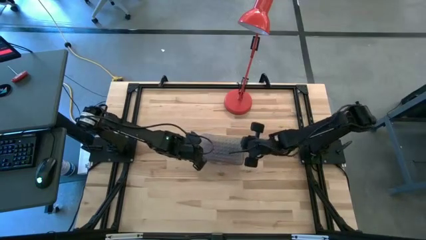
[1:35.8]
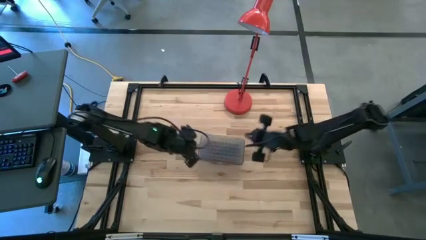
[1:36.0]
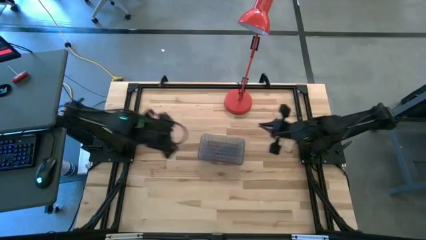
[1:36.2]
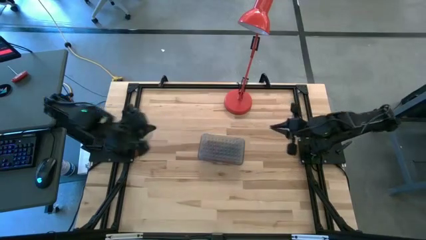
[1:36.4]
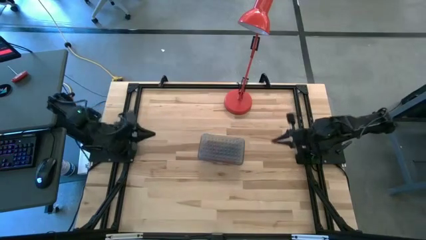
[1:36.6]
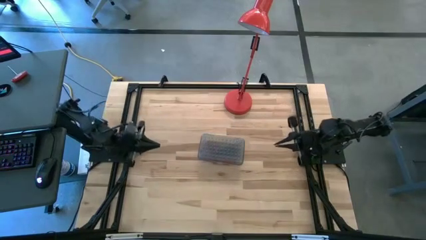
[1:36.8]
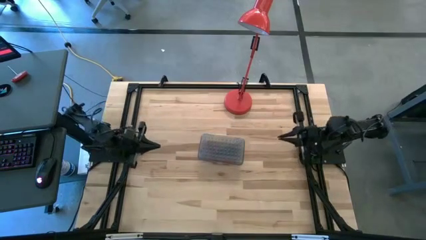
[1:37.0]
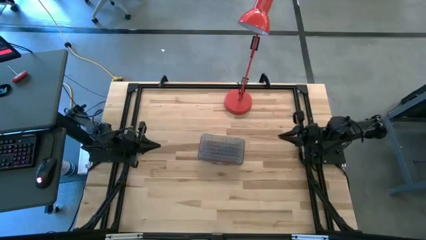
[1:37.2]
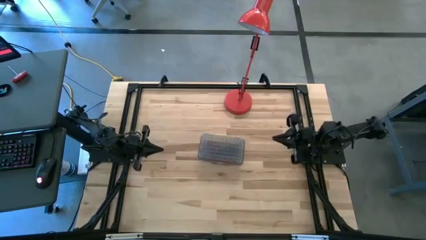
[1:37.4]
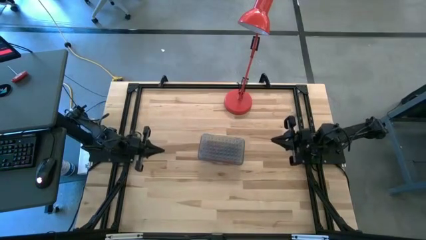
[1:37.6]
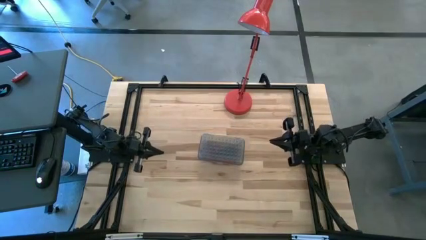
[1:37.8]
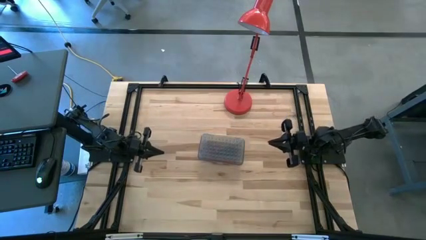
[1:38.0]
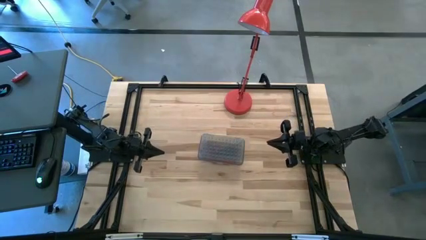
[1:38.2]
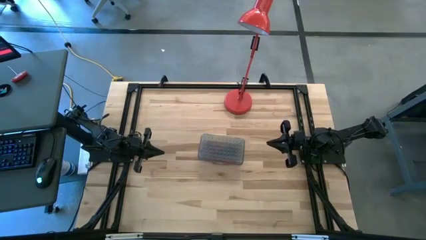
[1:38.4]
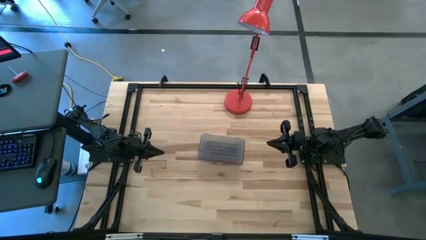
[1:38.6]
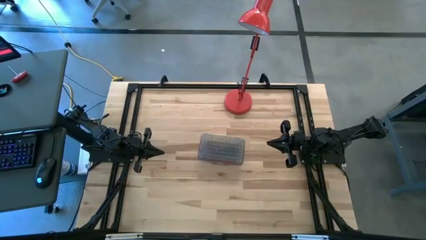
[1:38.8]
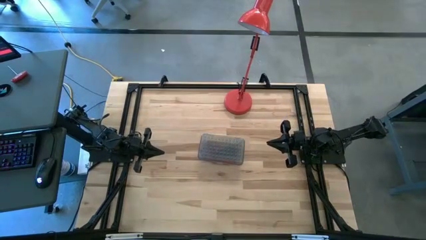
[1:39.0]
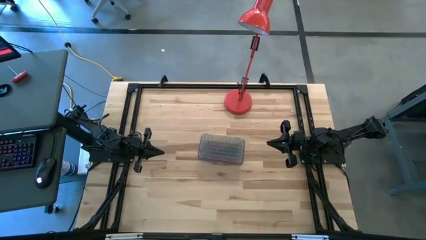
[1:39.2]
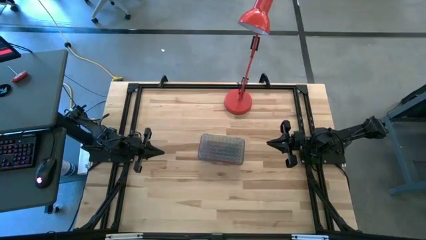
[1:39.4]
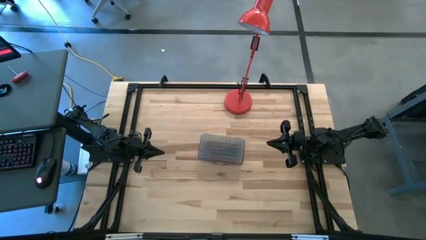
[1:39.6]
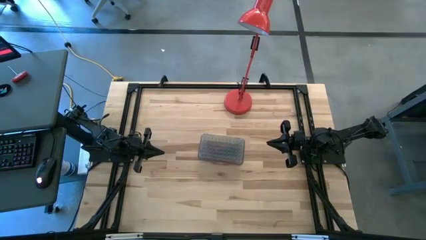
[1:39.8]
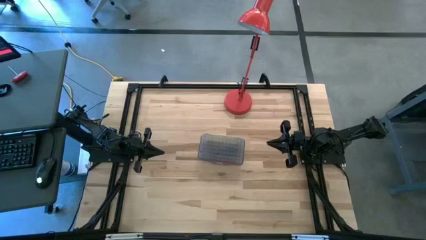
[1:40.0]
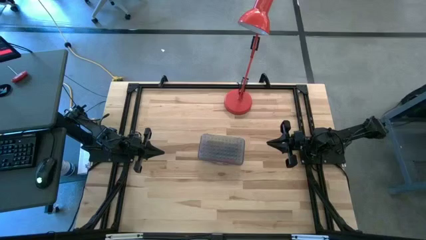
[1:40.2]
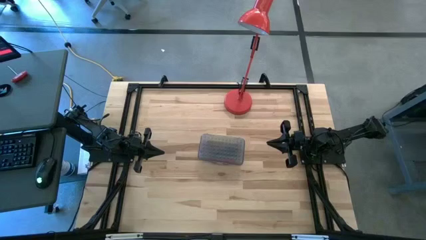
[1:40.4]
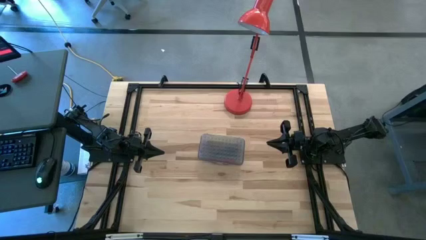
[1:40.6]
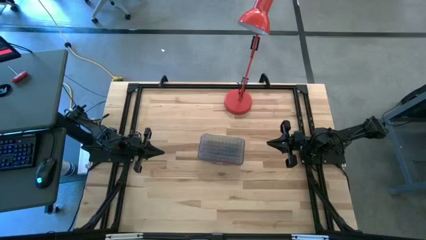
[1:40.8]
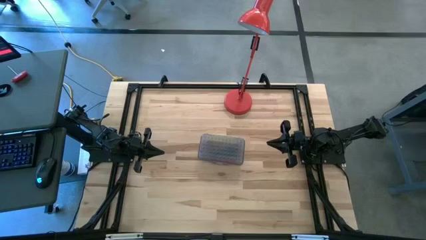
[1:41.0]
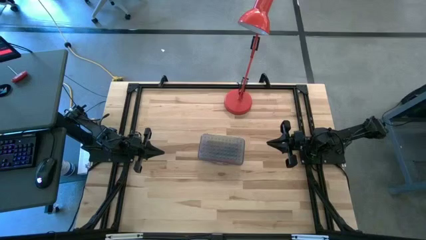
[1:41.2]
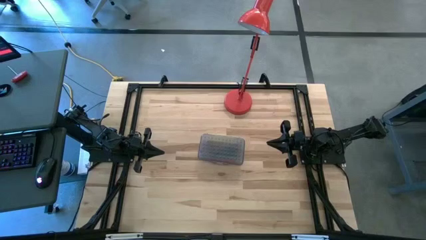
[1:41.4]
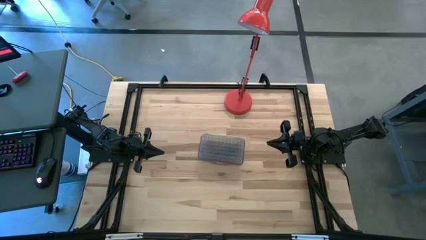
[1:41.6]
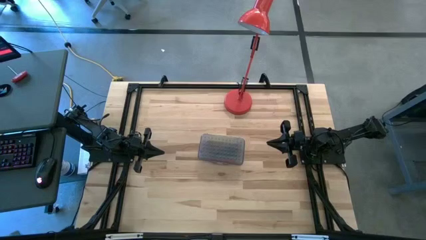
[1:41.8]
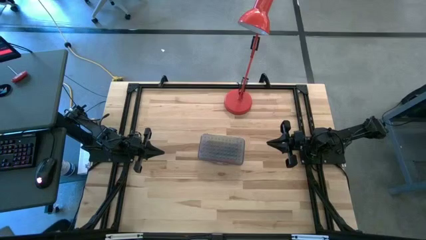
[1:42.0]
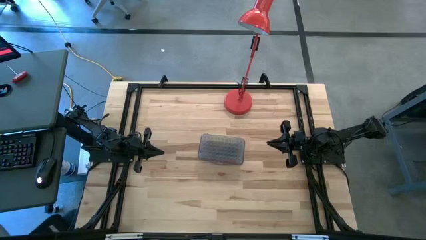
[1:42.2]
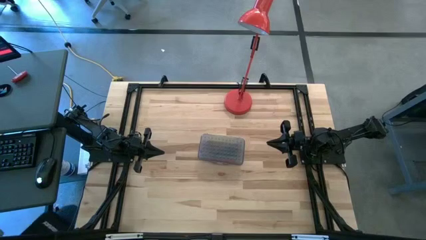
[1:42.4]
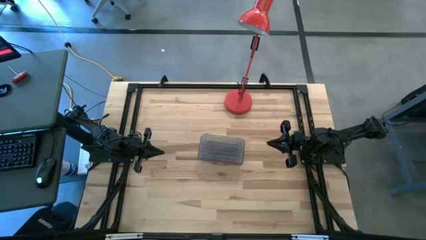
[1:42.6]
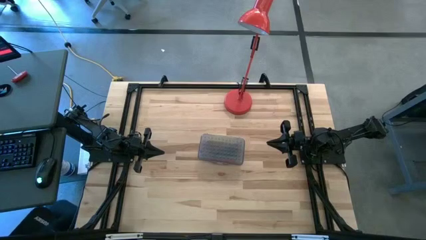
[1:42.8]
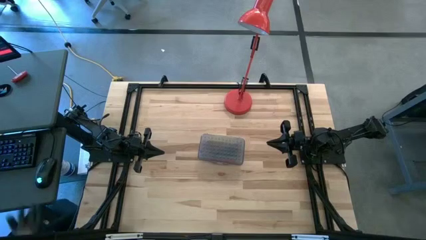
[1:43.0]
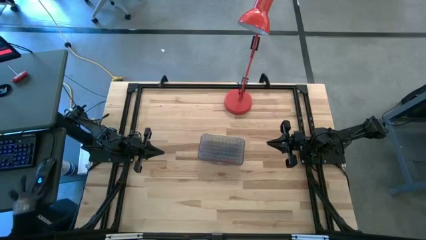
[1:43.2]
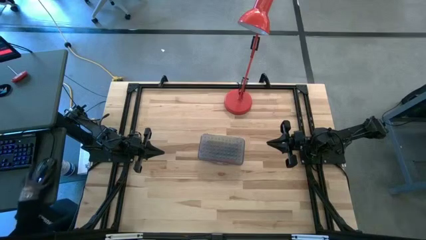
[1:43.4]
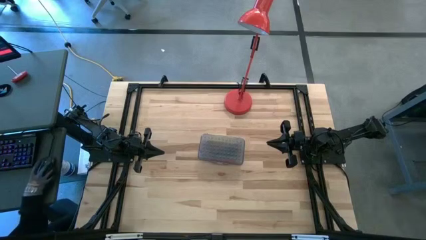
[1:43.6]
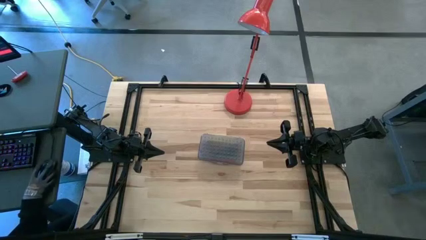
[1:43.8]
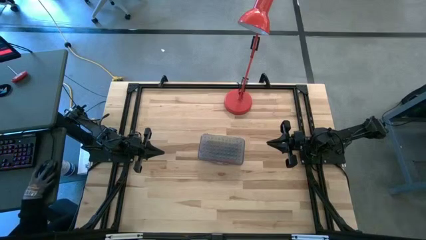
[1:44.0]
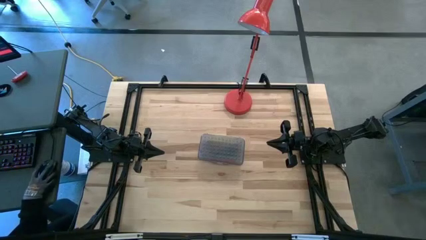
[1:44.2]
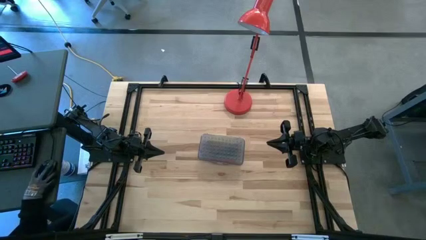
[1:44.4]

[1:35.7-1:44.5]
Task: Pick & place school supplies into a supply box
Return to Home Position

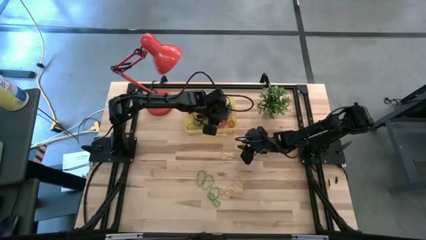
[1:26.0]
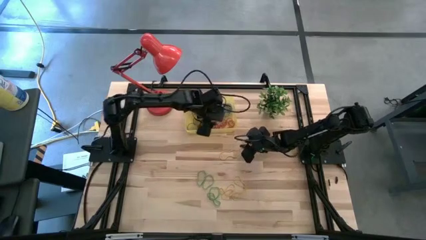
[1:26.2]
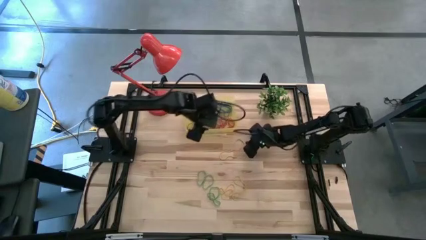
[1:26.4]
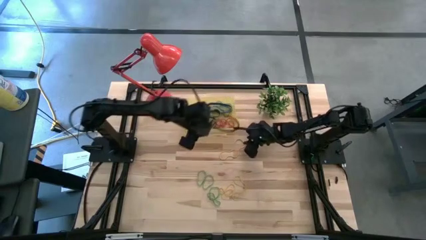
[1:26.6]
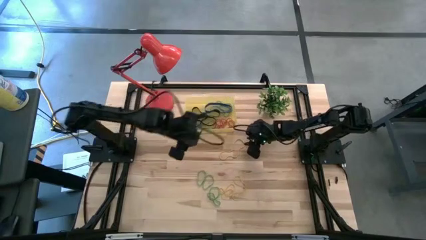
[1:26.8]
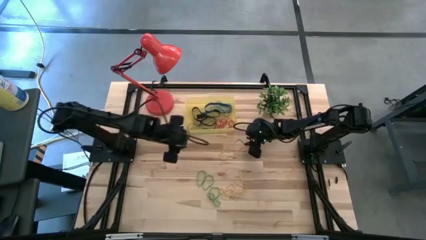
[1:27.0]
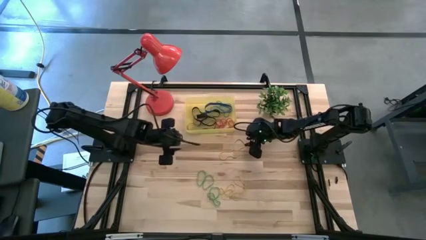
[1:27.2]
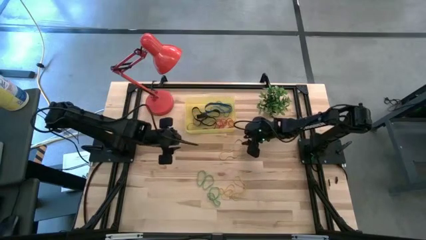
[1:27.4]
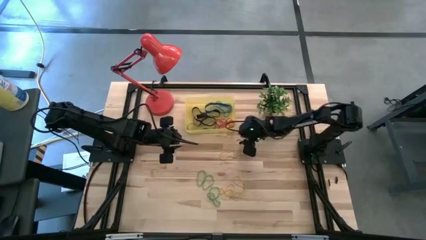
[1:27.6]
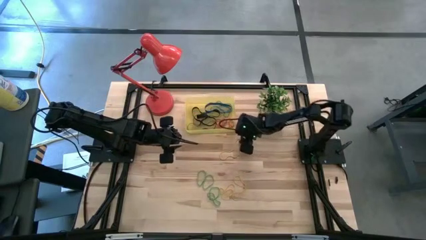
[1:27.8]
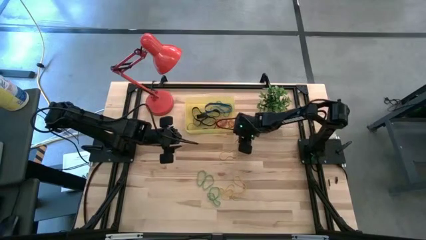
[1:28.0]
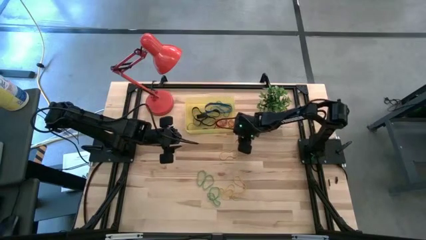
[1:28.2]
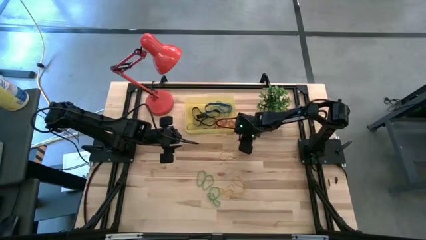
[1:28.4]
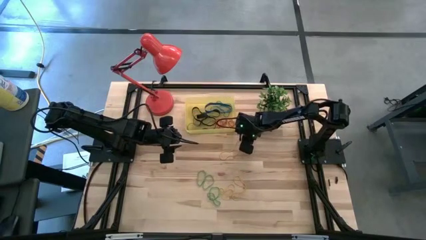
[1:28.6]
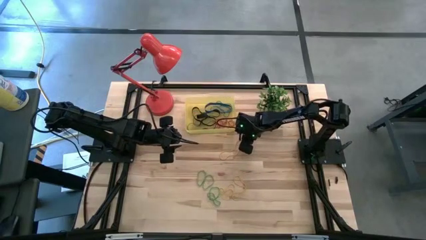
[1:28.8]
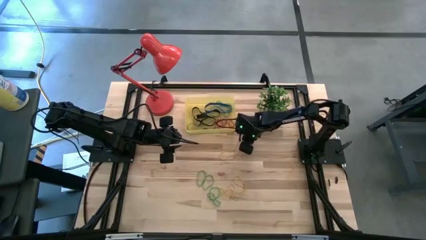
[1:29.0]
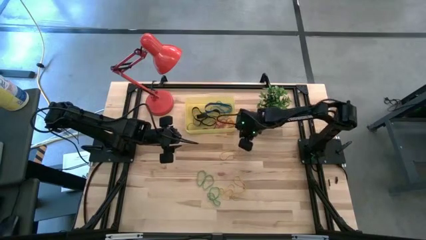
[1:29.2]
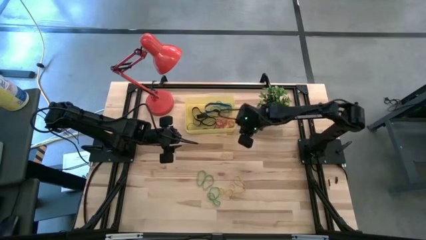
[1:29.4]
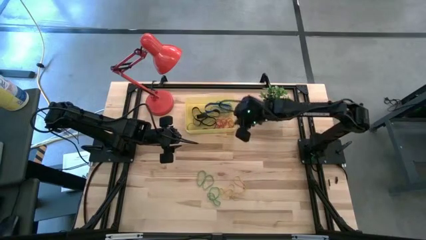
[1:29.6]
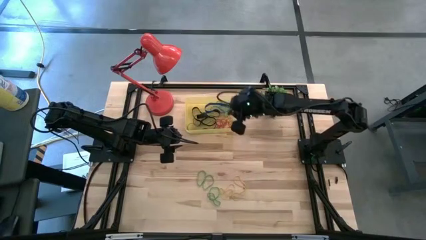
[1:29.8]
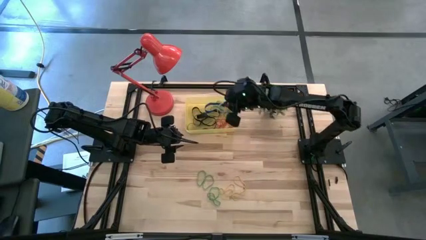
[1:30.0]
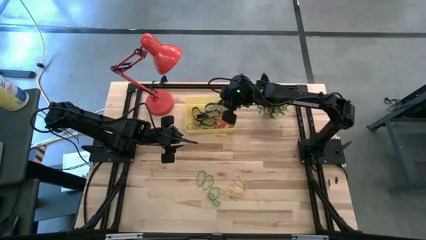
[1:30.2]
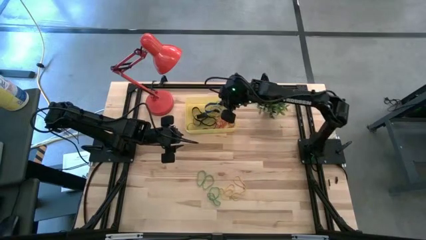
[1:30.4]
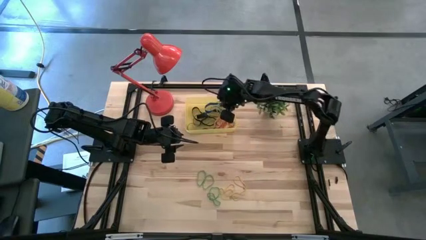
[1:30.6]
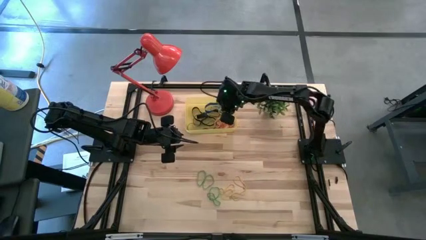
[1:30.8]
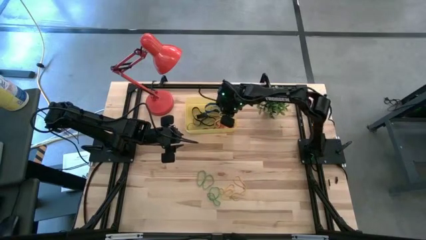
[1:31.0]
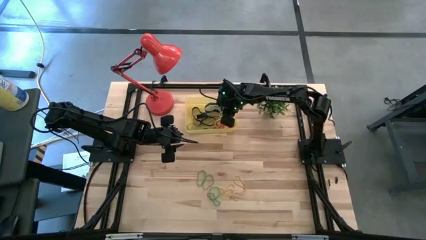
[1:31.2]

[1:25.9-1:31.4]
Task: Pick and place rubber bands into bin
Put the yellow rubber band into the yellow container

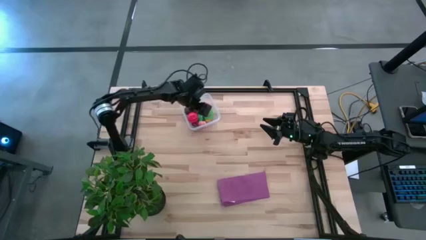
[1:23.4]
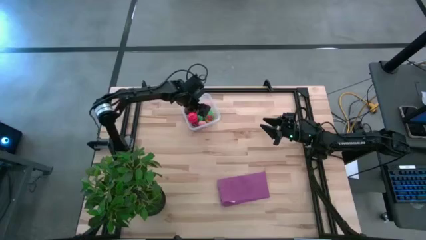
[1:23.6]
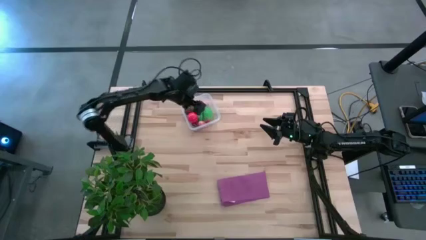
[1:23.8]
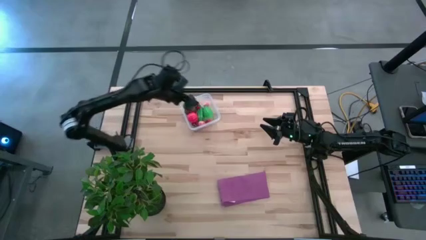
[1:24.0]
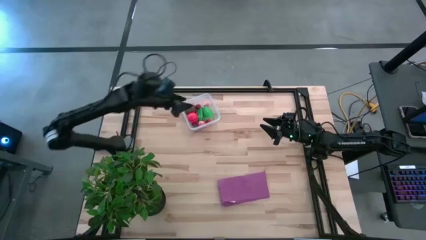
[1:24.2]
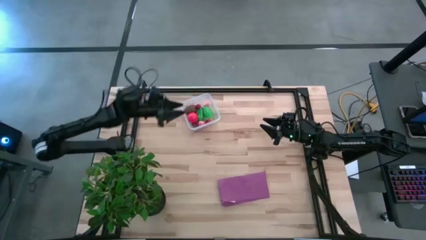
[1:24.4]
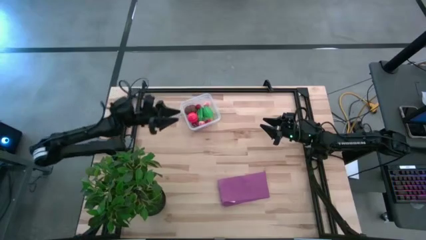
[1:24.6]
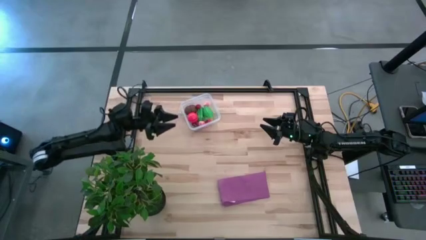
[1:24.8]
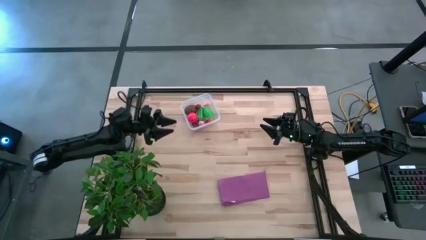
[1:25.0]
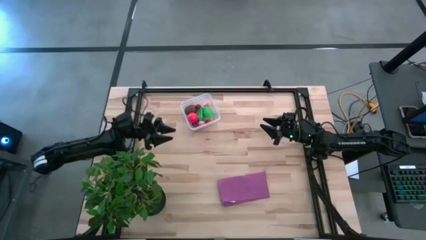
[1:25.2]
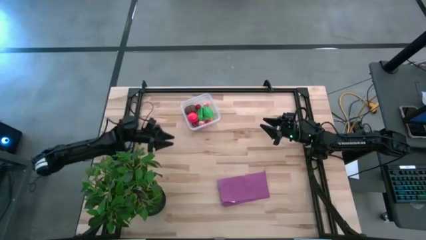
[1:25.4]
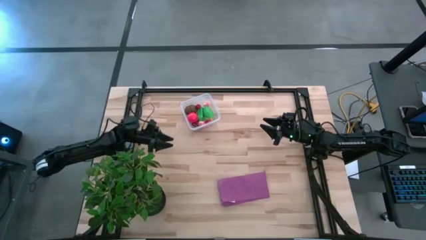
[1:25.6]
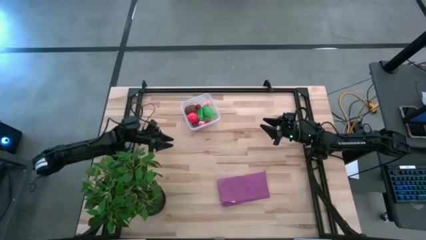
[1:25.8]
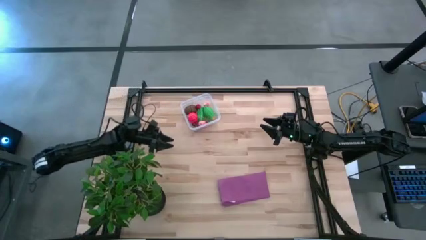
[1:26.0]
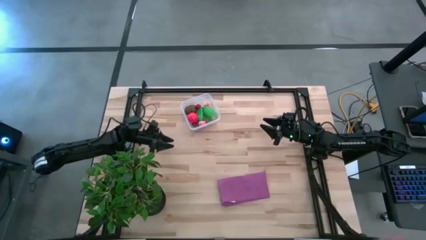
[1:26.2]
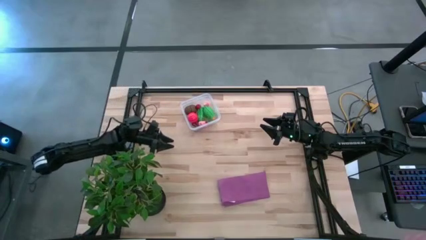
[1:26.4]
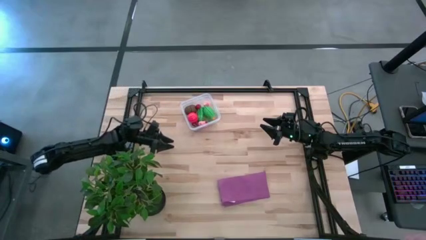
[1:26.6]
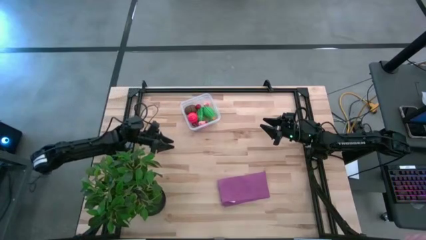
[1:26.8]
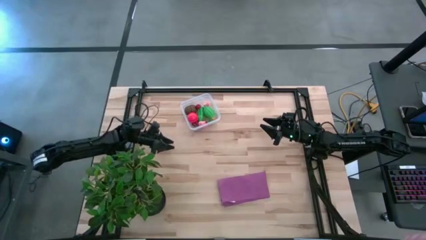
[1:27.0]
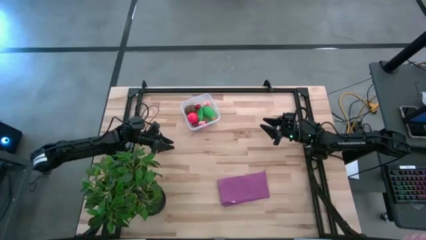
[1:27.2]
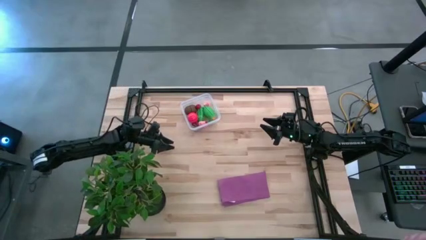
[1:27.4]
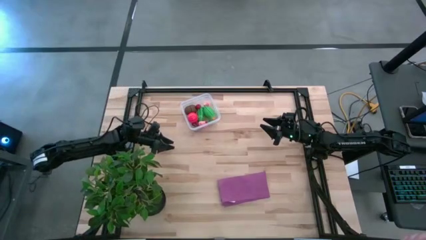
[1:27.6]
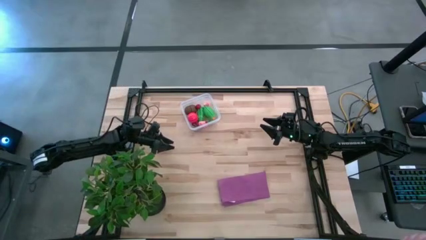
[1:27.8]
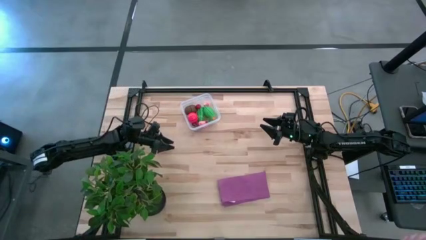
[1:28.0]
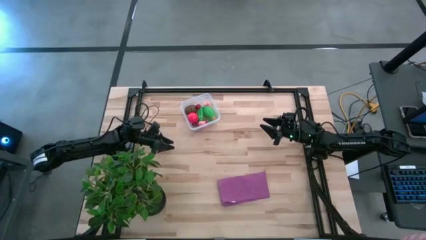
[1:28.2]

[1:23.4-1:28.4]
Task: Pick and placing Produce into tupperware
Return to Home Position
